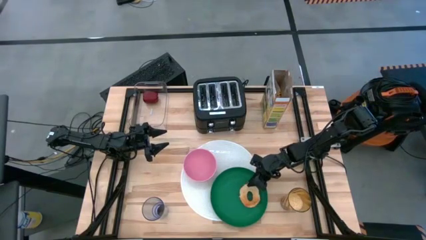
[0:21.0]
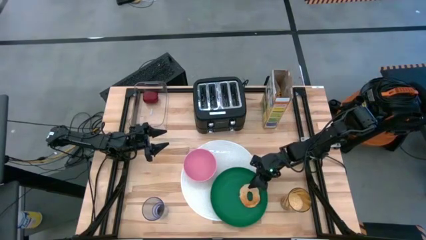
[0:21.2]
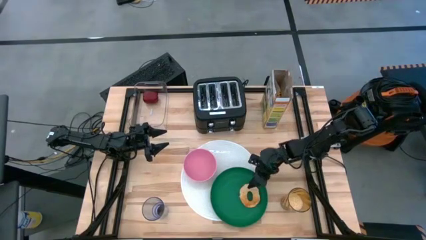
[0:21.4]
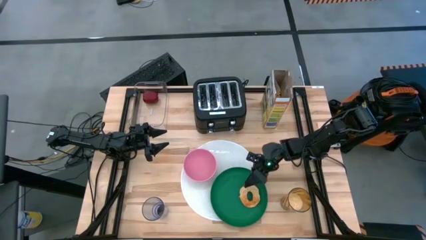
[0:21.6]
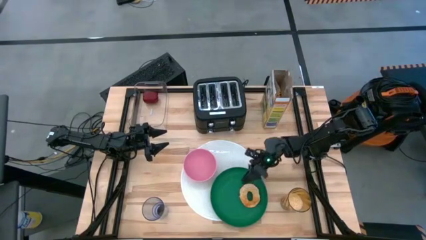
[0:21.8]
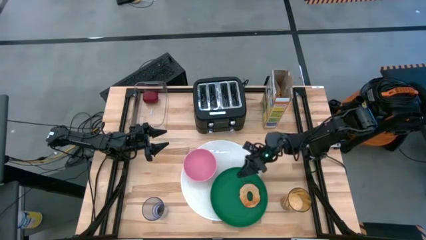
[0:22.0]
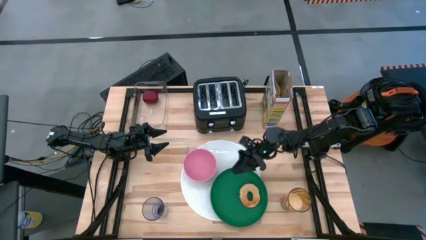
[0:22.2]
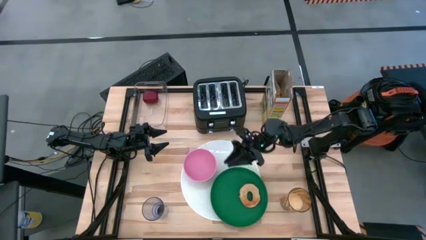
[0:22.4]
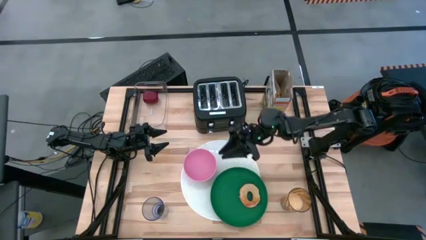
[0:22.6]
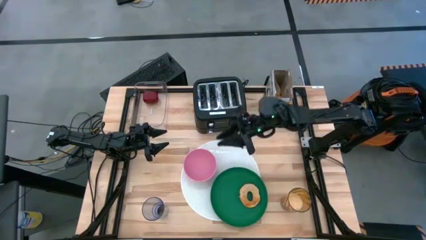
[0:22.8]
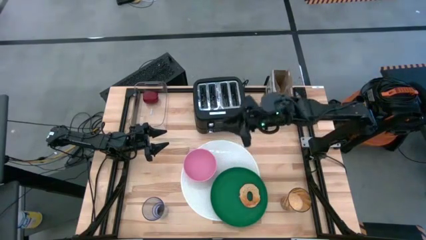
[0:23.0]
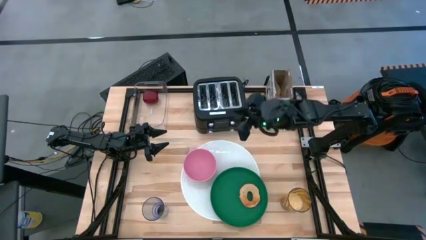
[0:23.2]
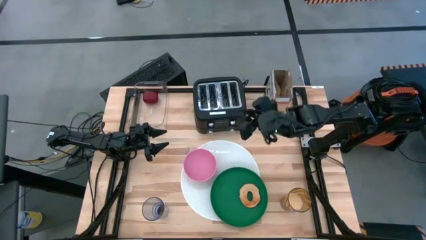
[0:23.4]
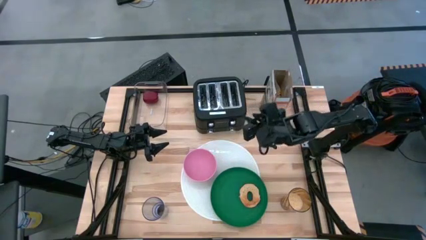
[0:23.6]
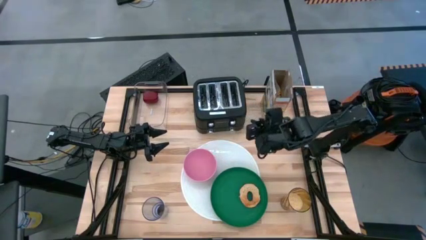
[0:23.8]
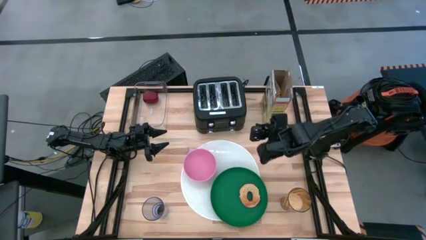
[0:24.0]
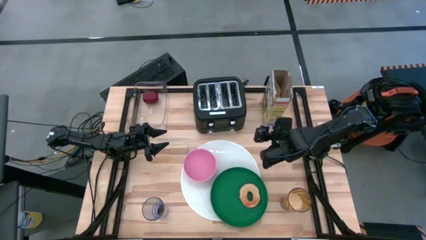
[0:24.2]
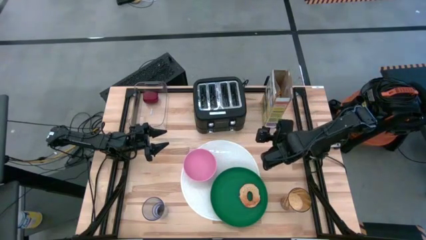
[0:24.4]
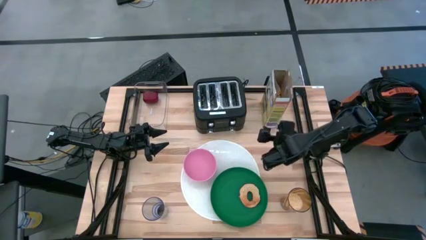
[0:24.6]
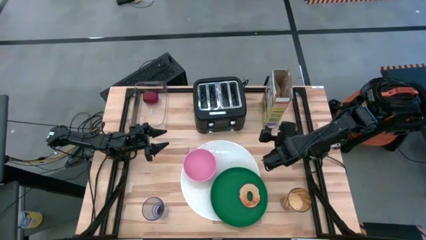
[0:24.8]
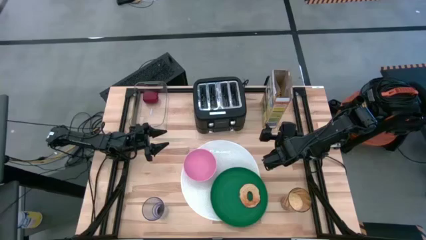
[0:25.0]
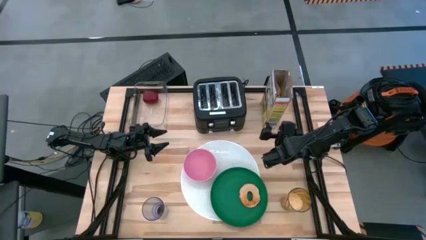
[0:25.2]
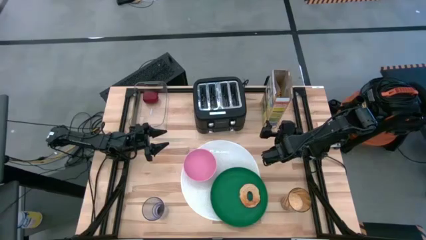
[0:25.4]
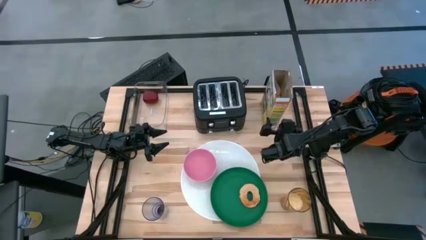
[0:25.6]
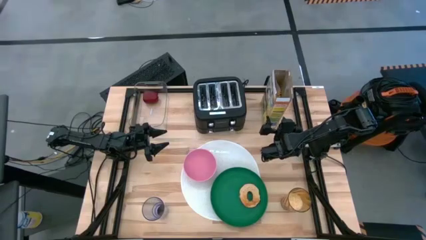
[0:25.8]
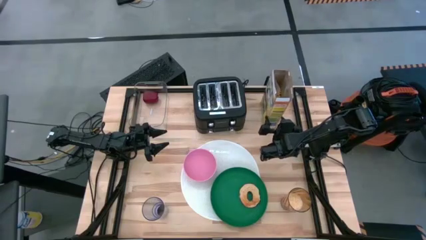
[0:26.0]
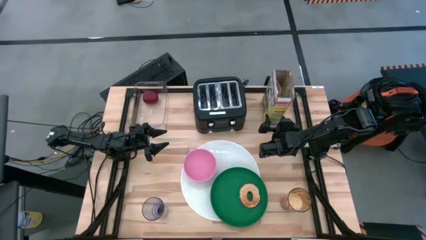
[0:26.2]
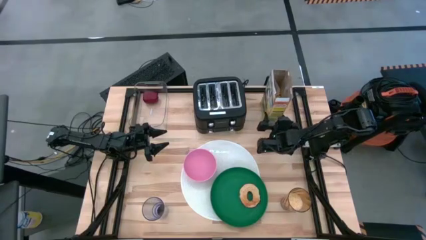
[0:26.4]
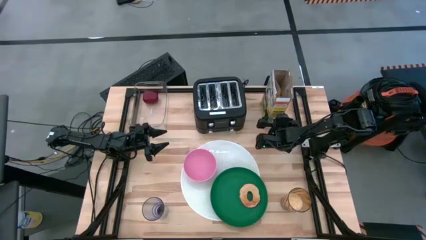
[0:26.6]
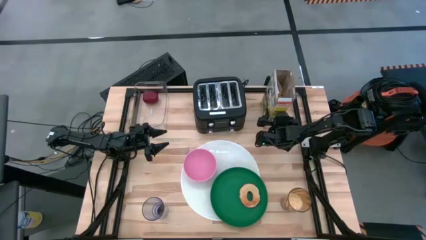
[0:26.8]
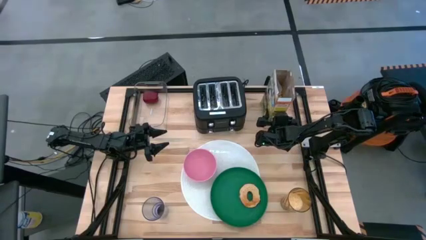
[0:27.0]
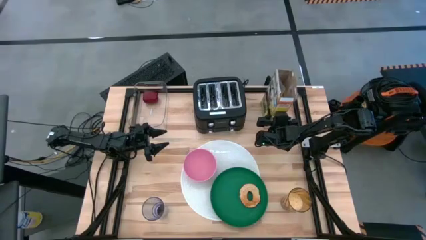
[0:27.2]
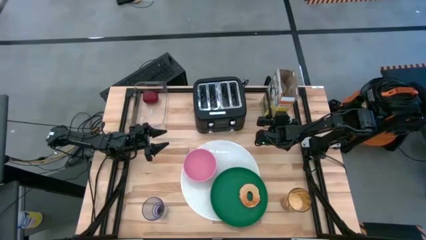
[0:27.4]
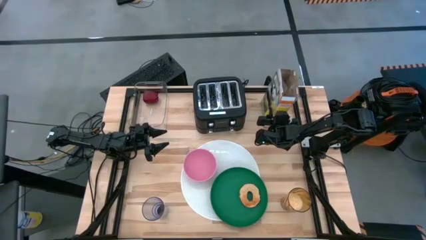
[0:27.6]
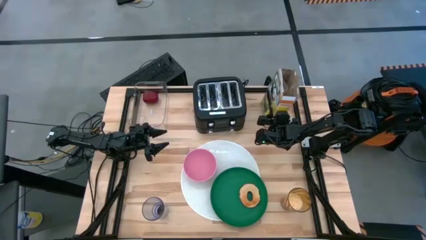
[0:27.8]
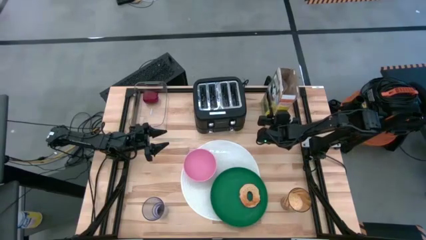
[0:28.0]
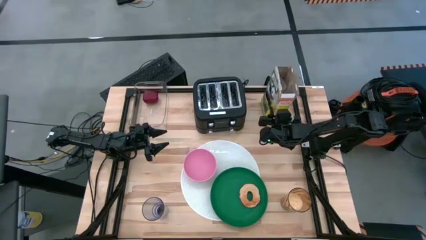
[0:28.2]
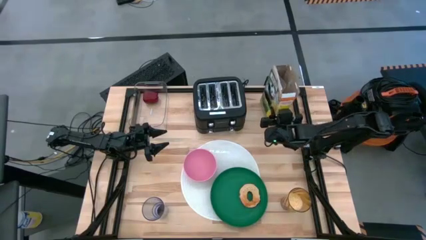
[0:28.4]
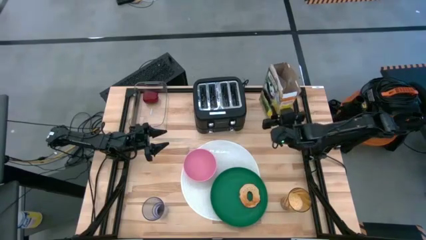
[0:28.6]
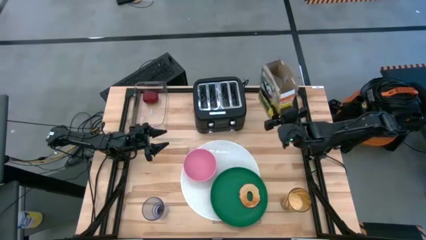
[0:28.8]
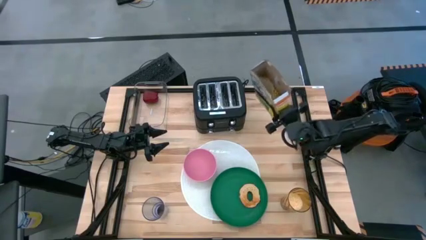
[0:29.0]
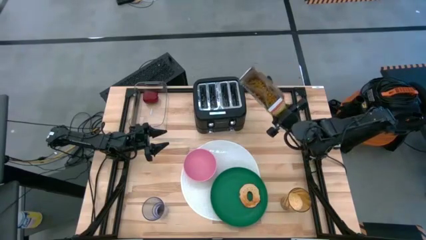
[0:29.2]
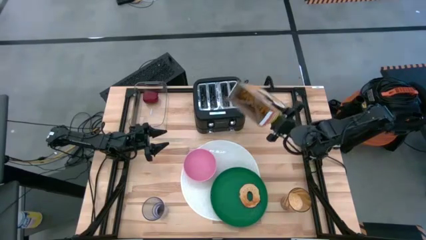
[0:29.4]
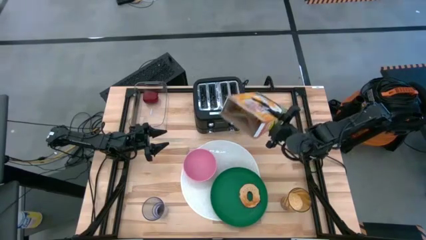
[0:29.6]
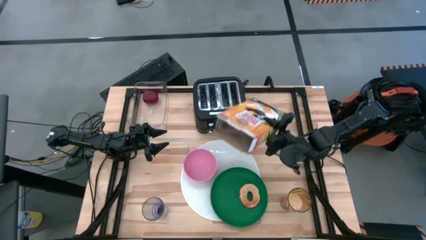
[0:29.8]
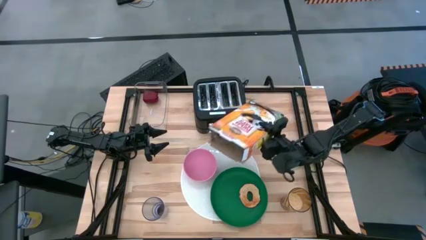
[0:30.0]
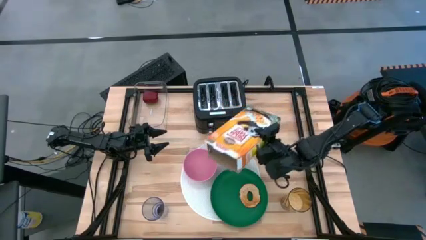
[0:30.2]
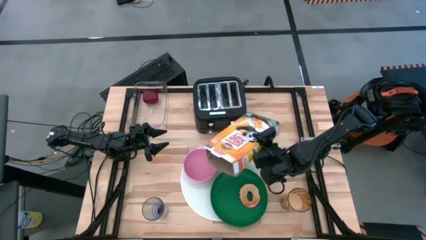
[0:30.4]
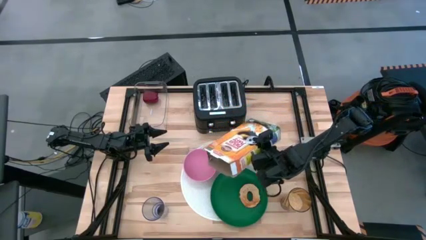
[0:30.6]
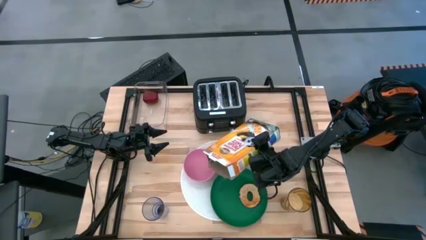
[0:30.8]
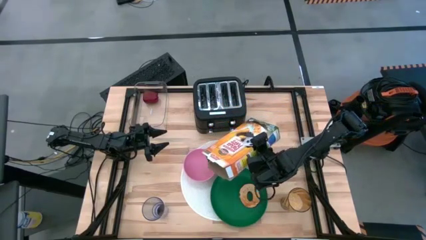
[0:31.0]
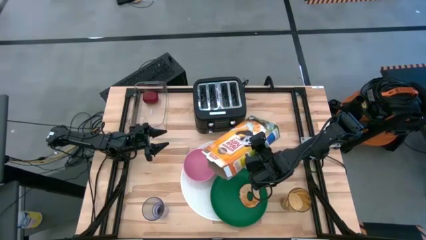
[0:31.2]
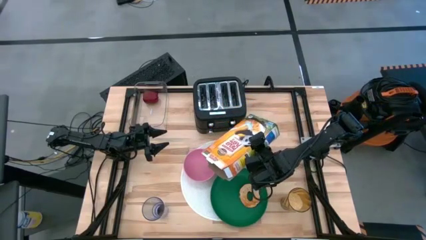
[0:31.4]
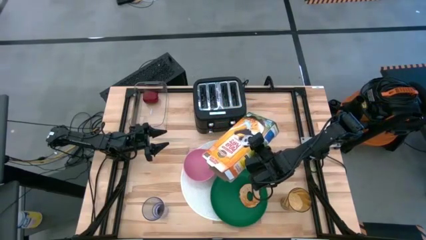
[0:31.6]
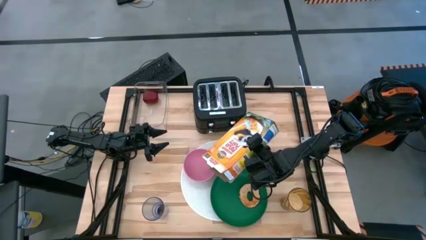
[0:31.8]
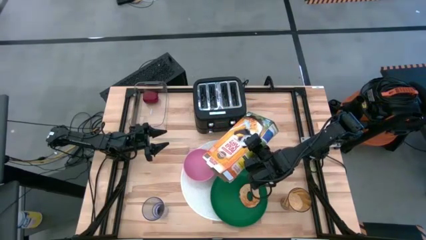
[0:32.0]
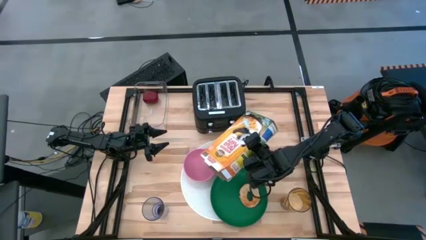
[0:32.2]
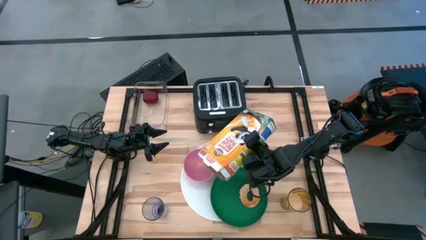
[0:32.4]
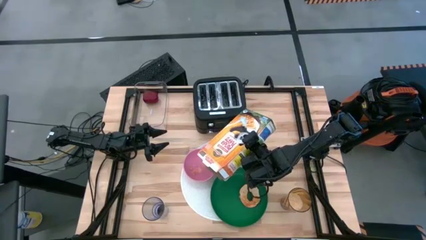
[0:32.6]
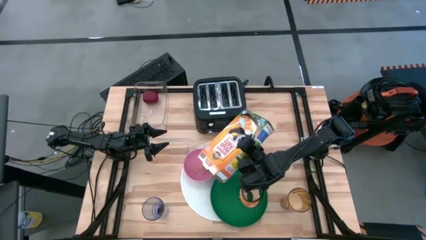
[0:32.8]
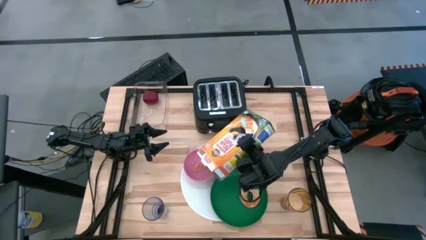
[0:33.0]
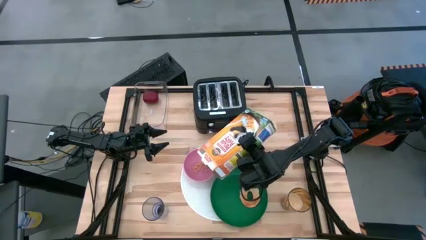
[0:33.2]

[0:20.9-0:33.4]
Task: Arrange a breakfast setting
Pour the cereal from the cereal box into the pink bowl

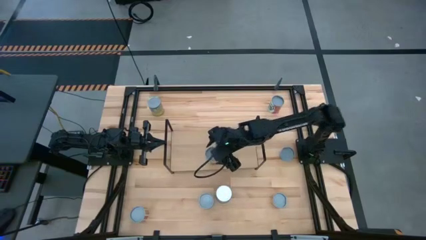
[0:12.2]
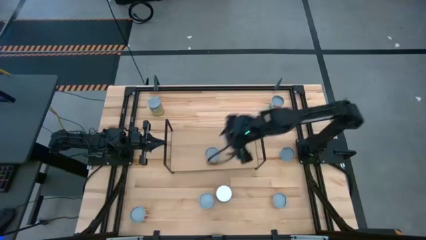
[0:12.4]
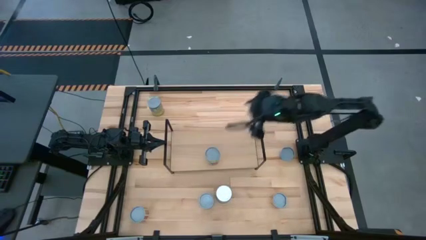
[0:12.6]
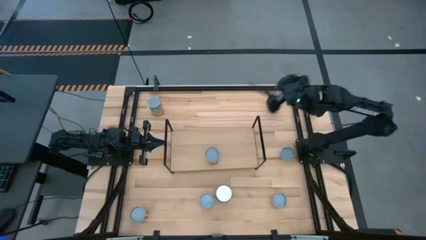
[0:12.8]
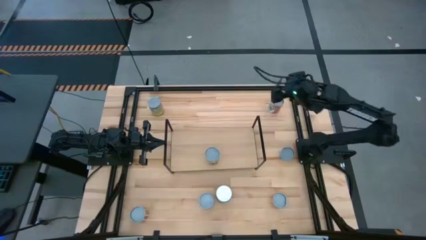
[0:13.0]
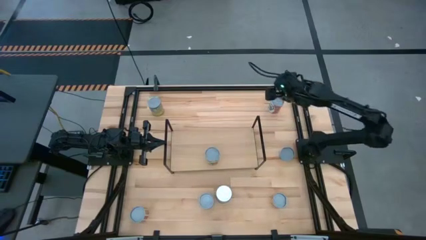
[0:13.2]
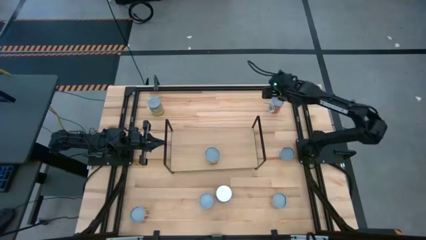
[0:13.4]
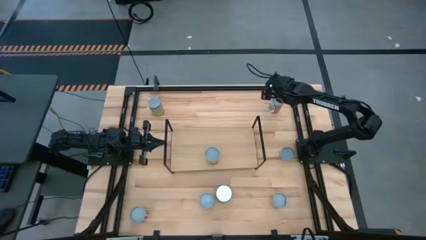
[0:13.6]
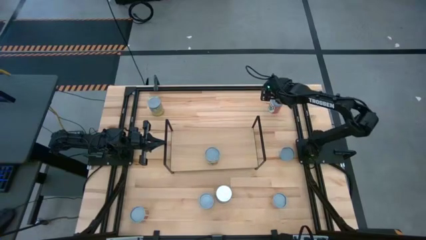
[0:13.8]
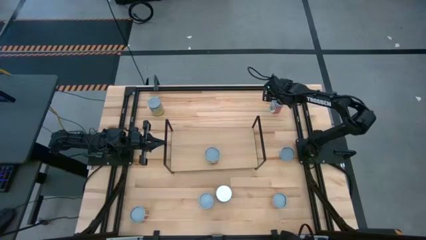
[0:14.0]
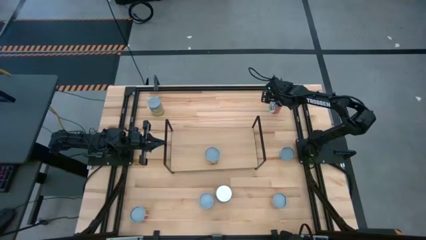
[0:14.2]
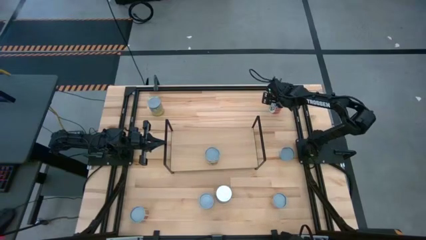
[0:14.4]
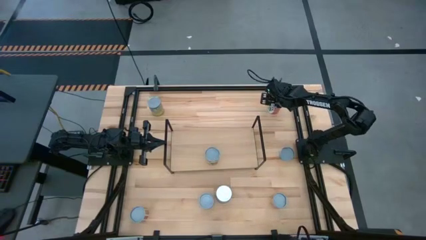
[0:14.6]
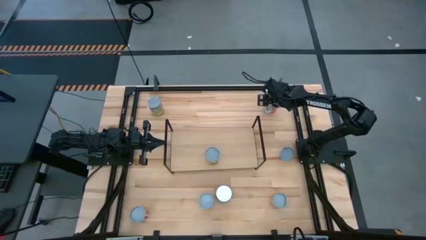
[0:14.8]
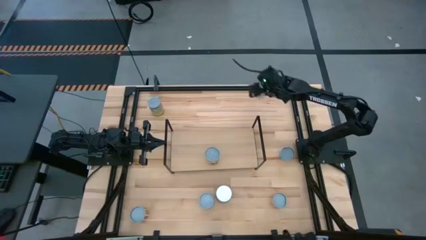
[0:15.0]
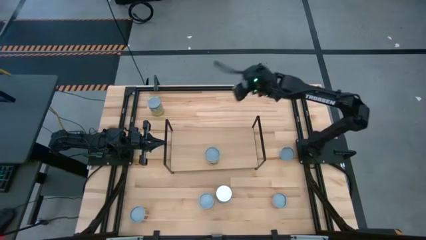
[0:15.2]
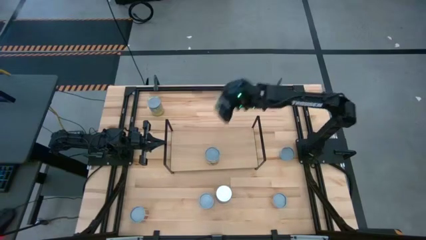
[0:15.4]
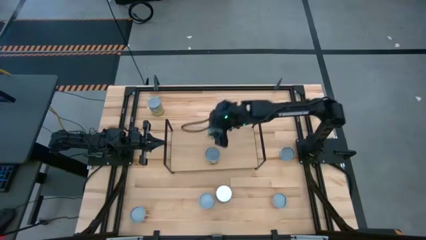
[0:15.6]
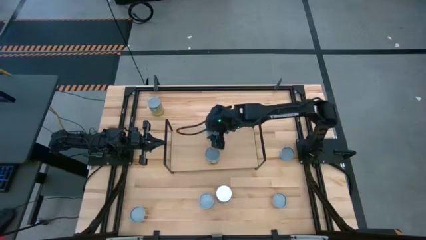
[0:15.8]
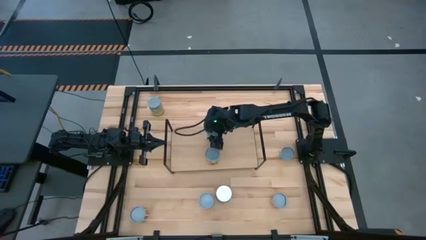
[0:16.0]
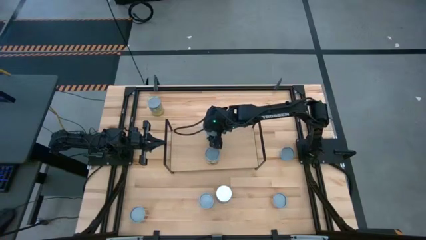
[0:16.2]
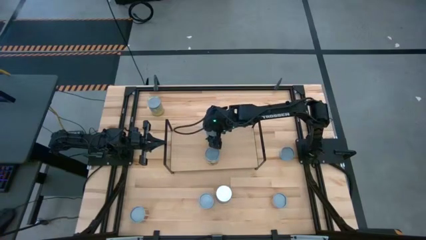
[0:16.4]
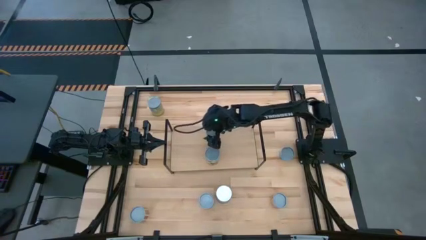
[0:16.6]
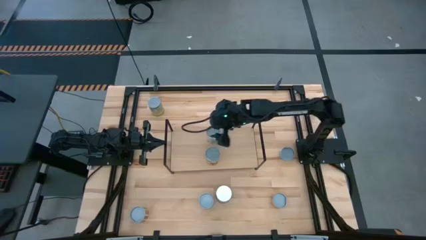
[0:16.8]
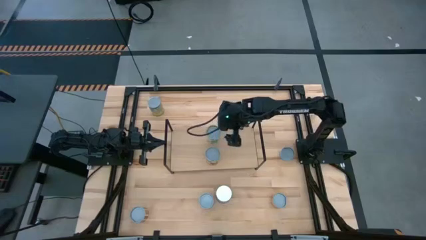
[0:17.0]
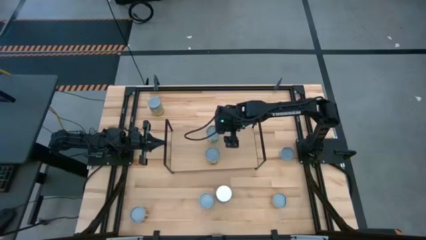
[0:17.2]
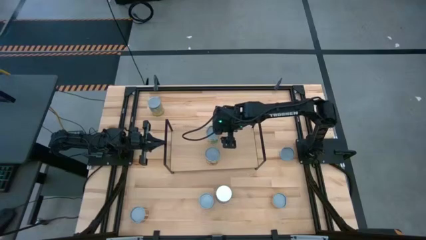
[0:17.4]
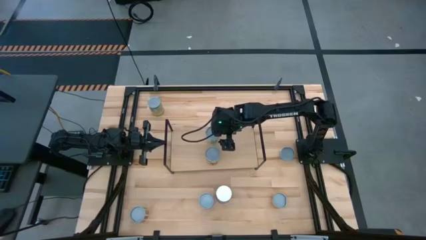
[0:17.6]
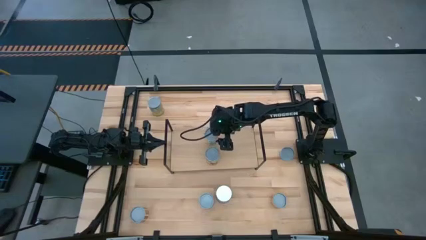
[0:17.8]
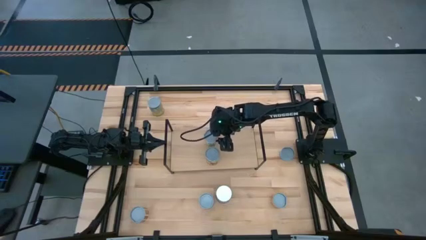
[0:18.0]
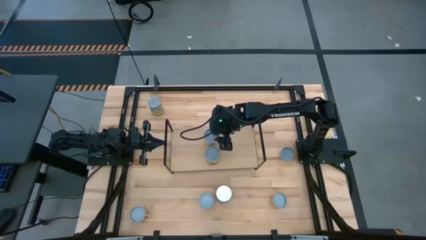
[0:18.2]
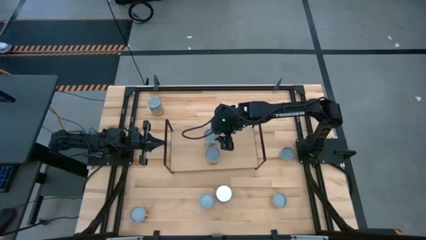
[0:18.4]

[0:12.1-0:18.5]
Task: Pick and place cans onto a shelf
Put the canned mix fruits on the shelf
